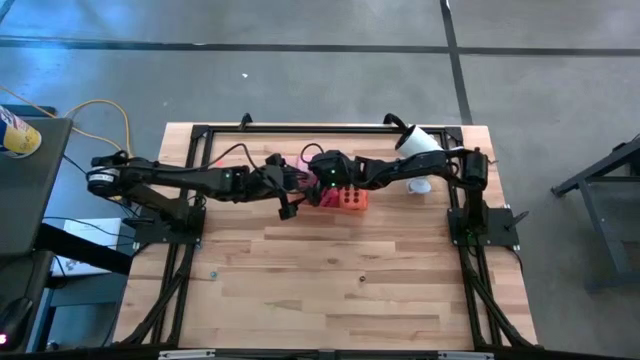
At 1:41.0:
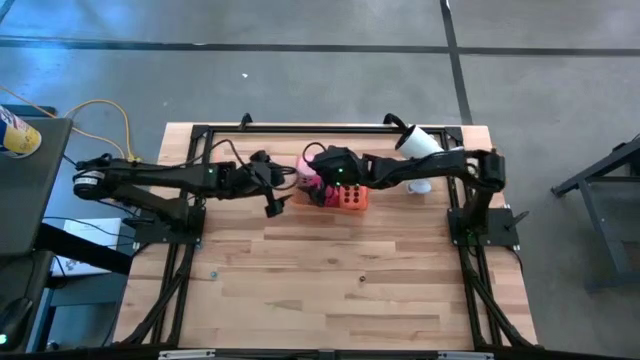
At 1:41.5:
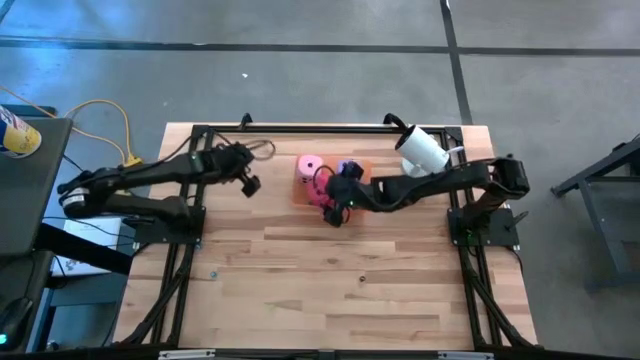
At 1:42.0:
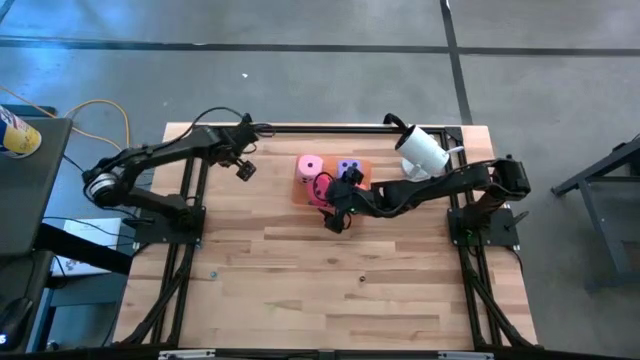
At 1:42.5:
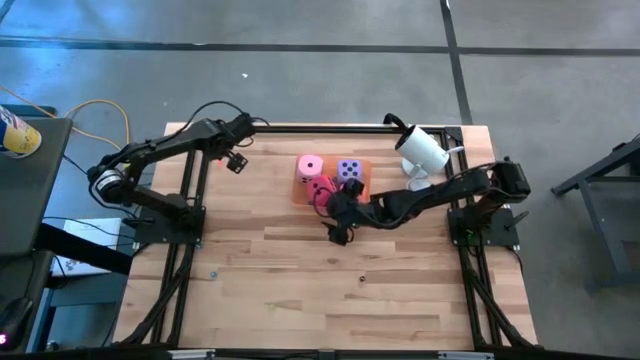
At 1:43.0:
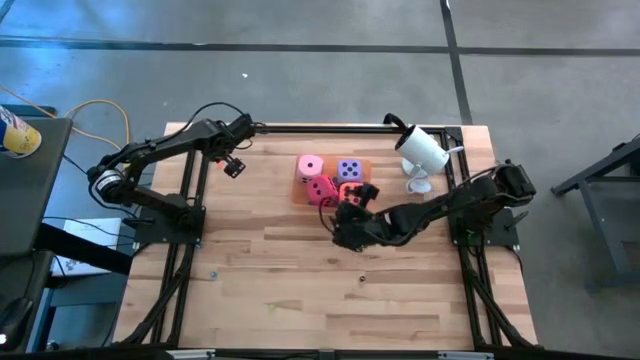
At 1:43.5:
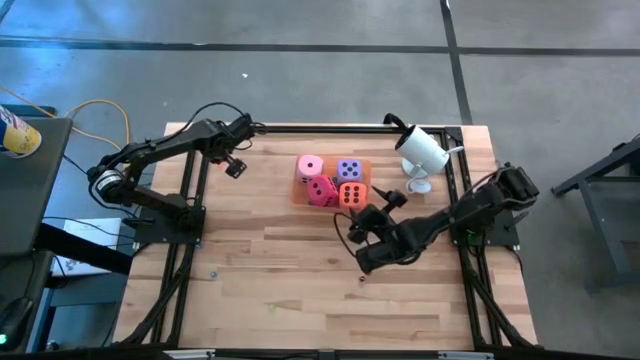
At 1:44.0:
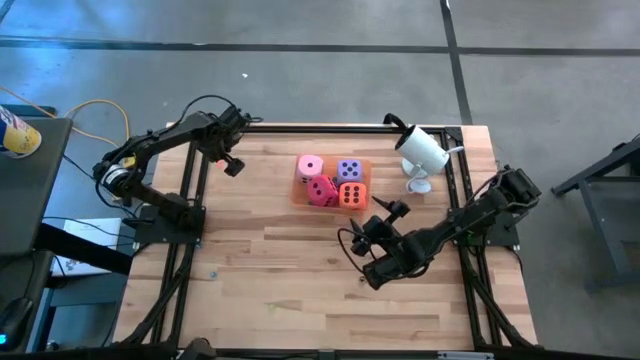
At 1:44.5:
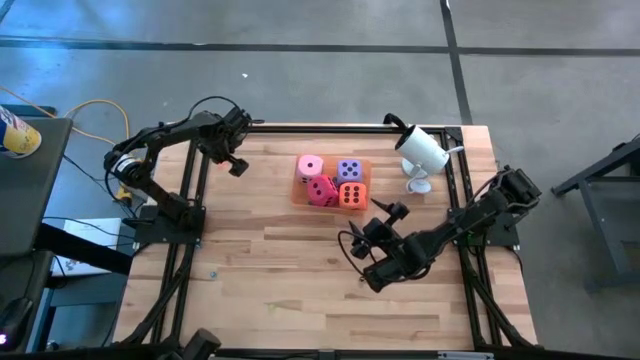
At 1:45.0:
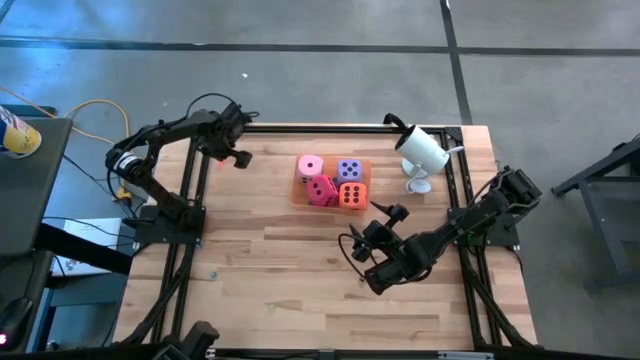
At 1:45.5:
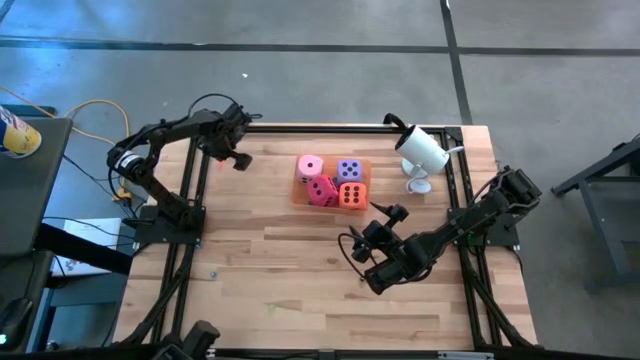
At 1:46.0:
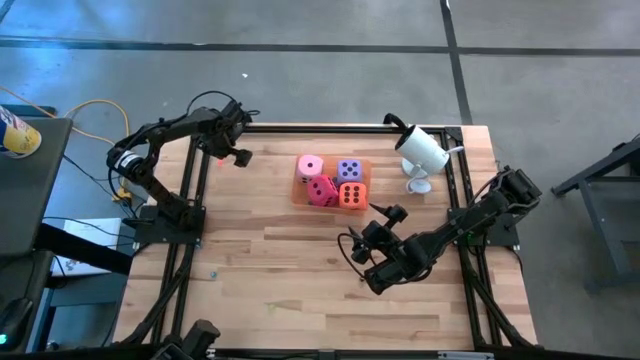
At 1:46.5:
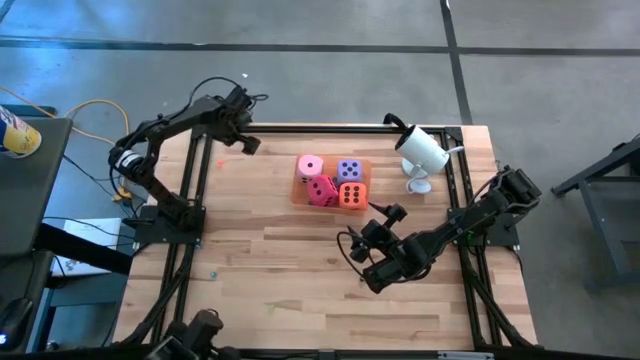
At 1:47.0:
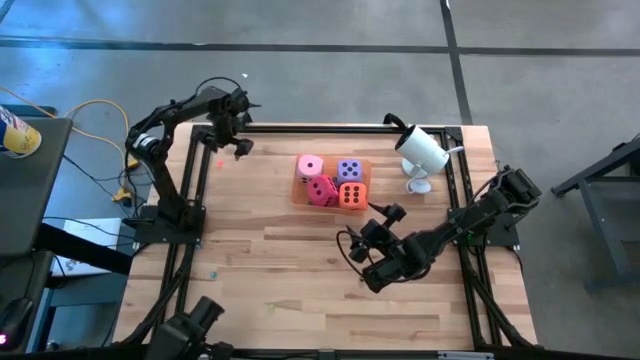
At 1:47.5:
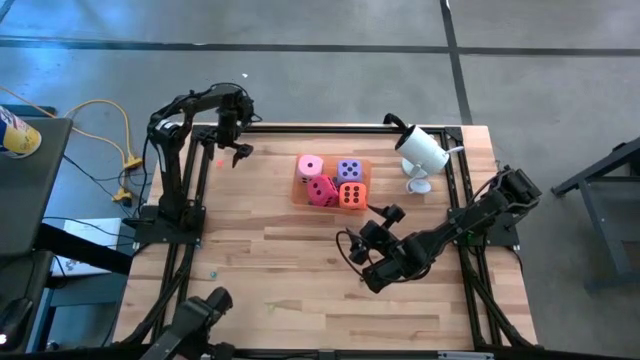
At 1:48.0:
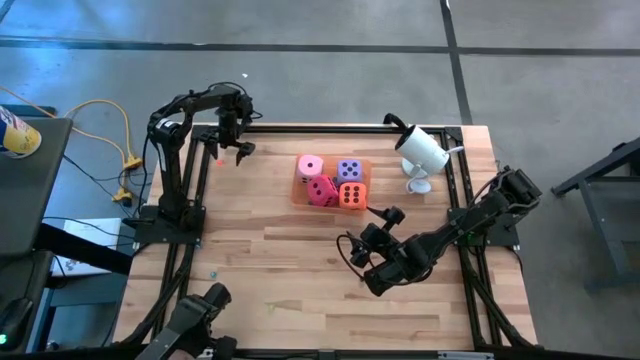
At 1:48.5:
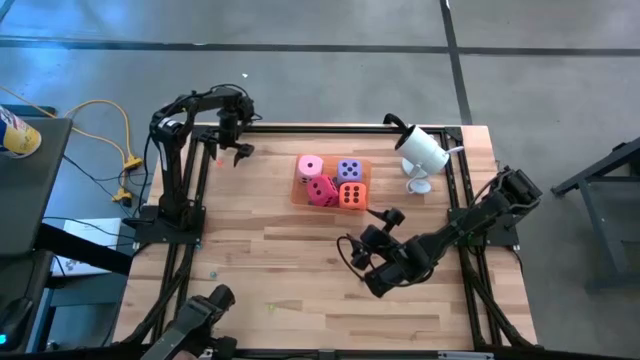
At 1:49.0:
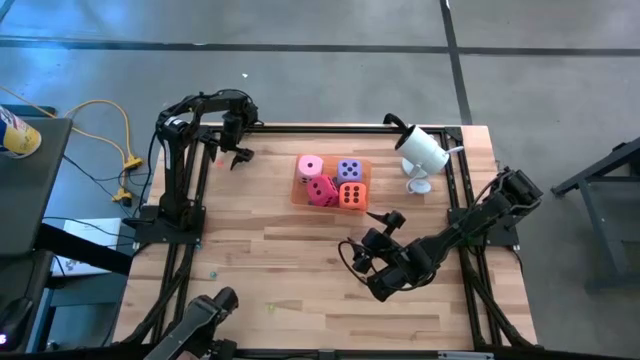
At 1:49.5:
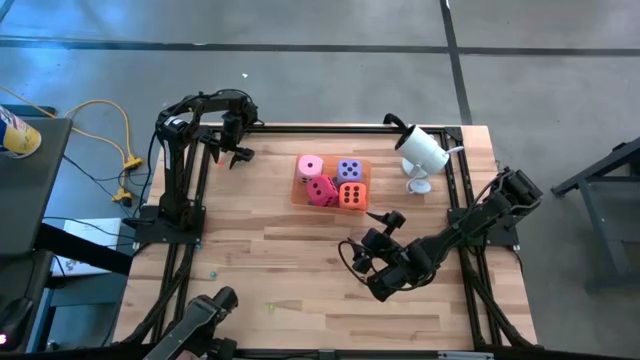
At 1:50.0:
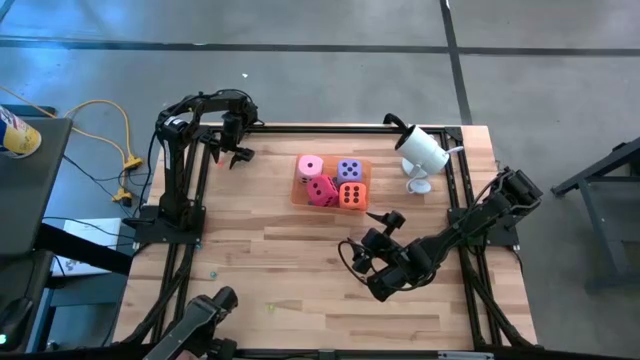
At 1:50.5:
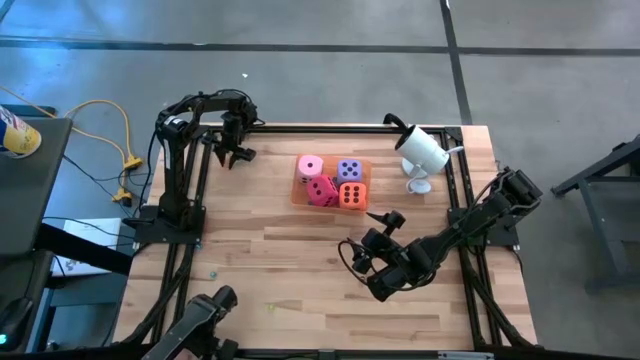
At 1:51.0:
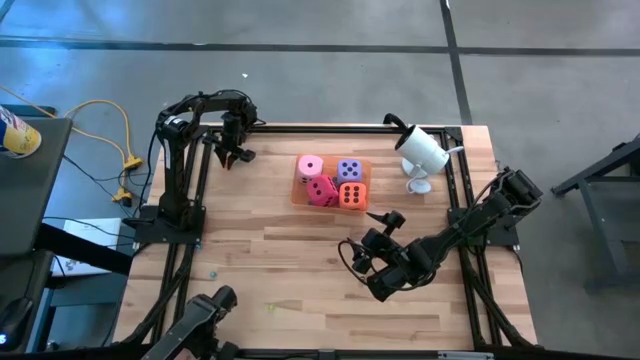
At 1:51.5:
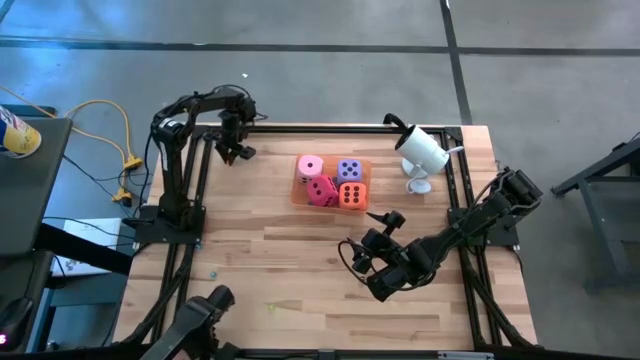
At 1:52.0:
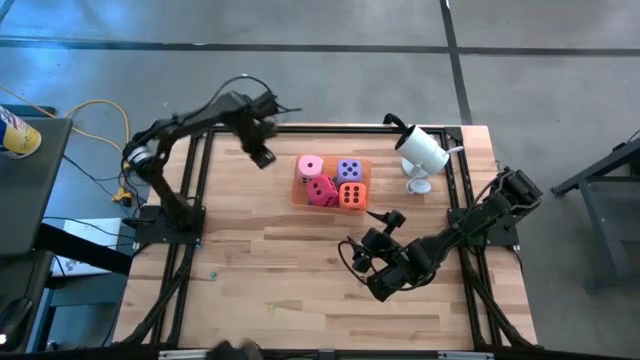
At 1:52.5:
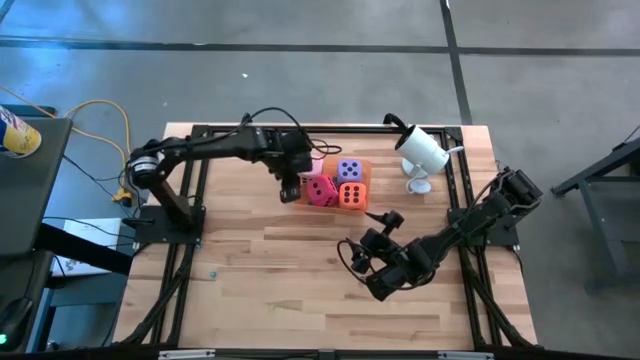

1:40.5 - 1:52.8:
Task: Pick & Place Dice
Put the small orange die into the orange bin

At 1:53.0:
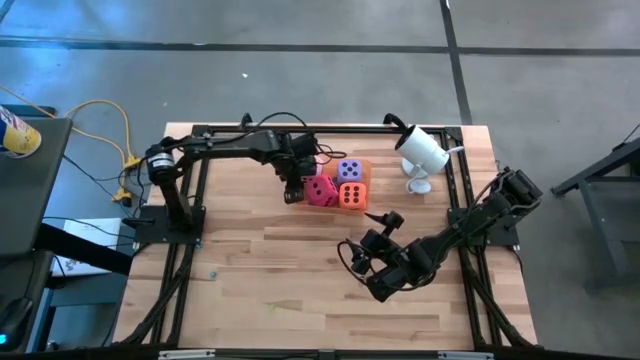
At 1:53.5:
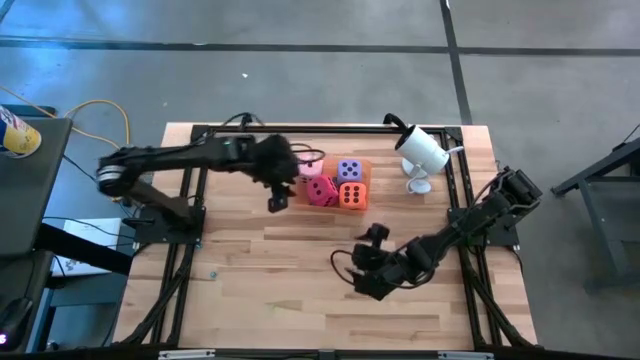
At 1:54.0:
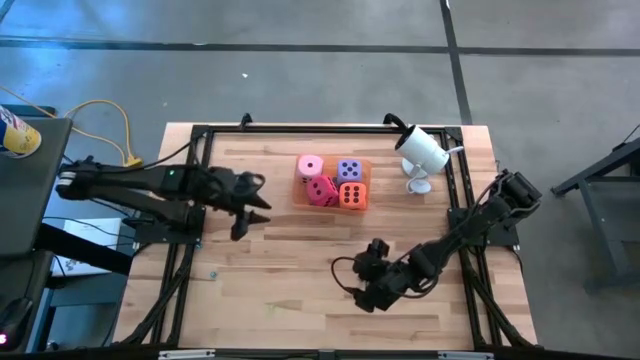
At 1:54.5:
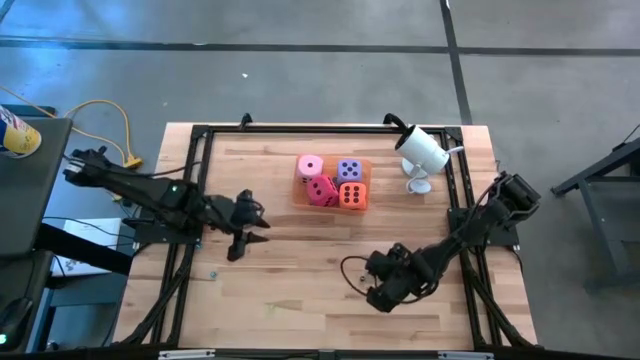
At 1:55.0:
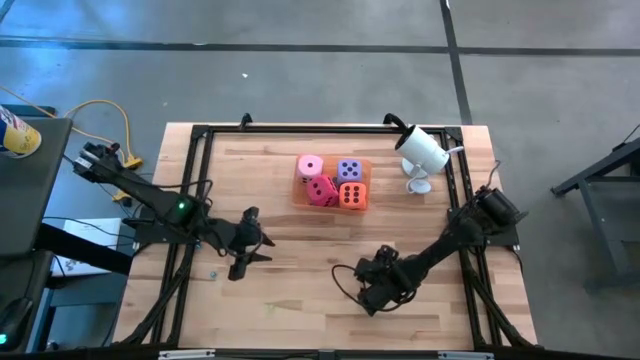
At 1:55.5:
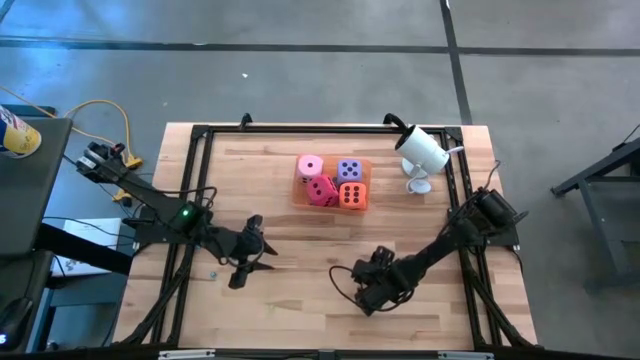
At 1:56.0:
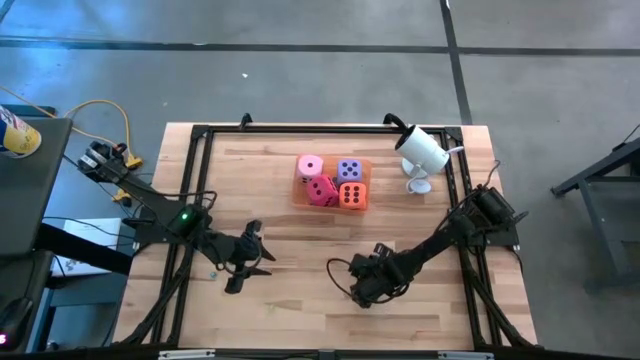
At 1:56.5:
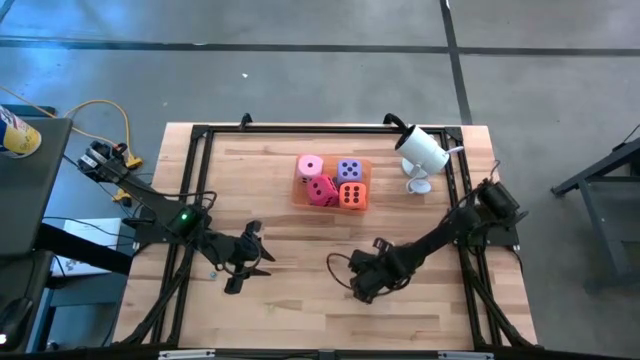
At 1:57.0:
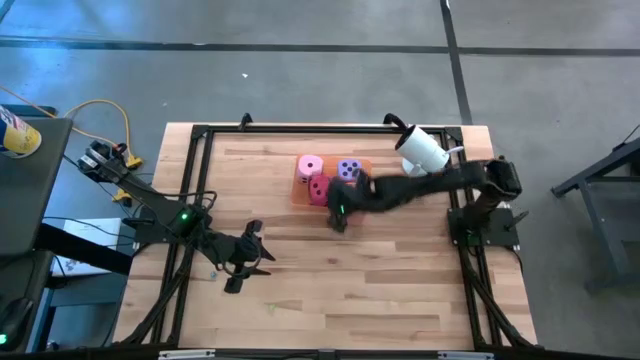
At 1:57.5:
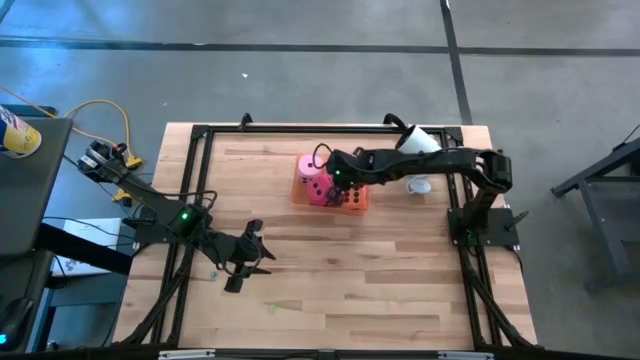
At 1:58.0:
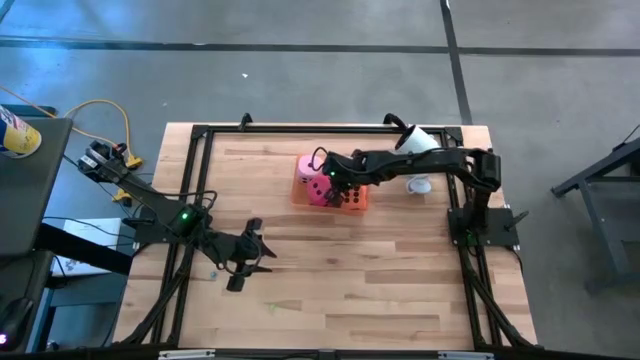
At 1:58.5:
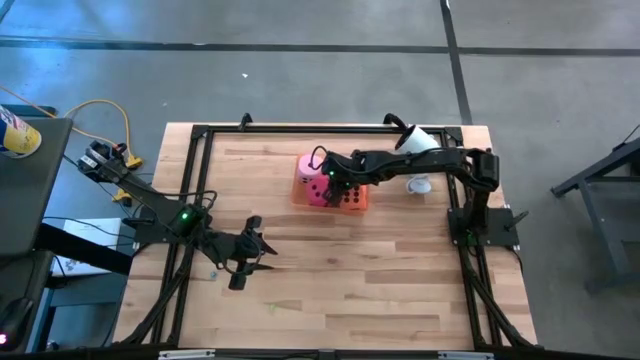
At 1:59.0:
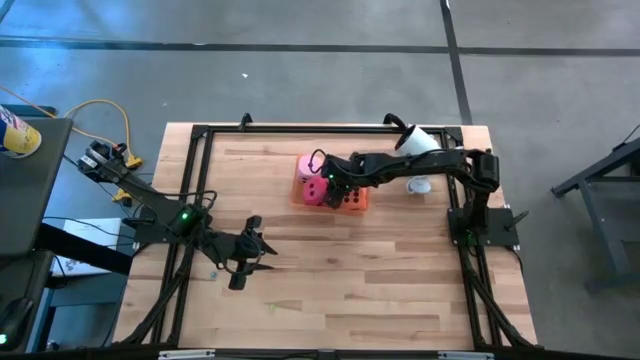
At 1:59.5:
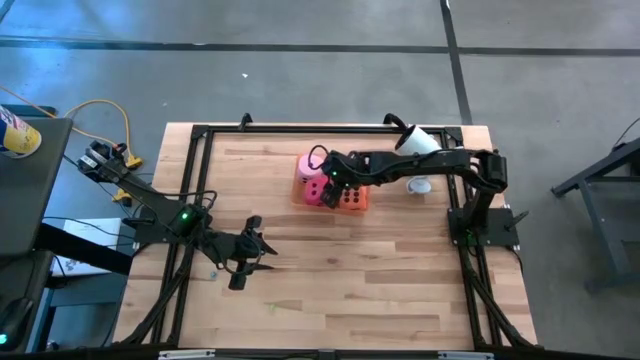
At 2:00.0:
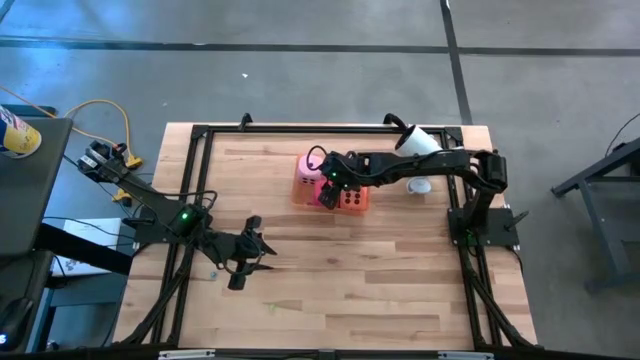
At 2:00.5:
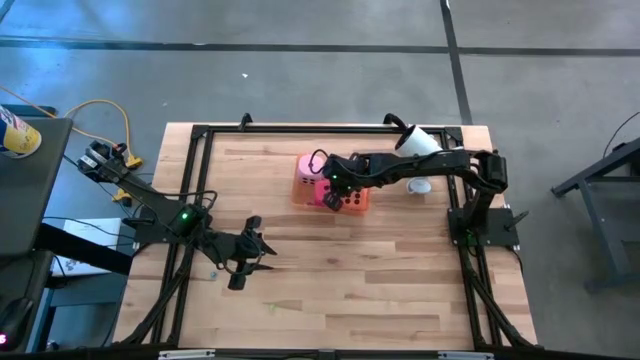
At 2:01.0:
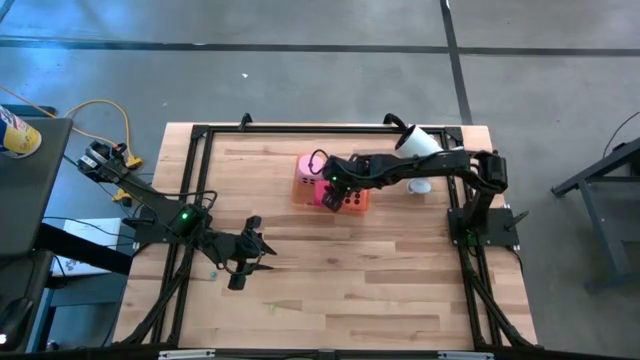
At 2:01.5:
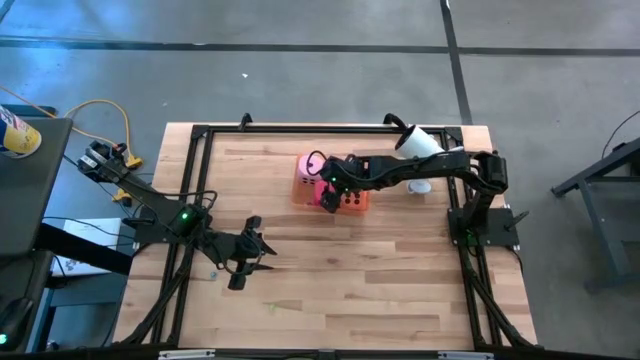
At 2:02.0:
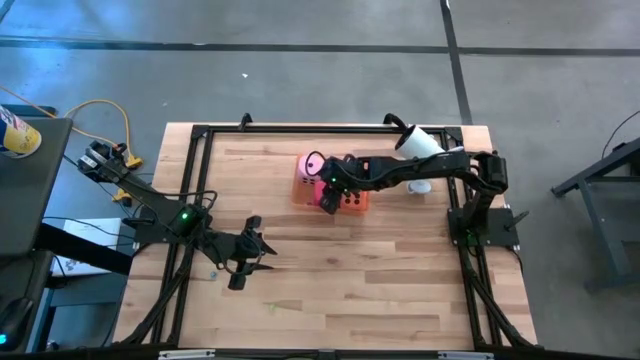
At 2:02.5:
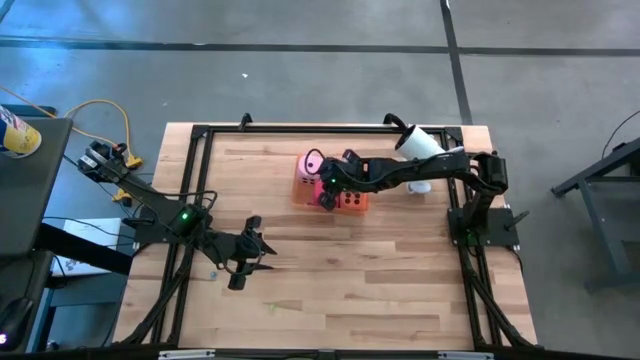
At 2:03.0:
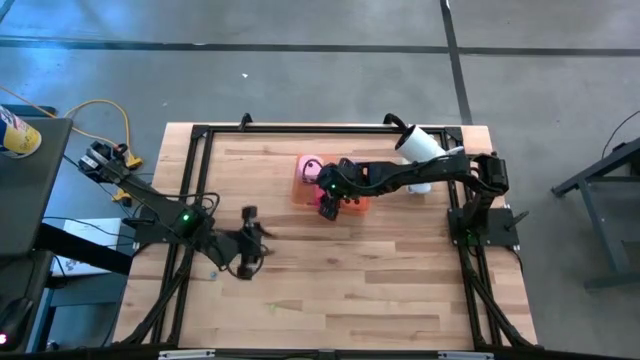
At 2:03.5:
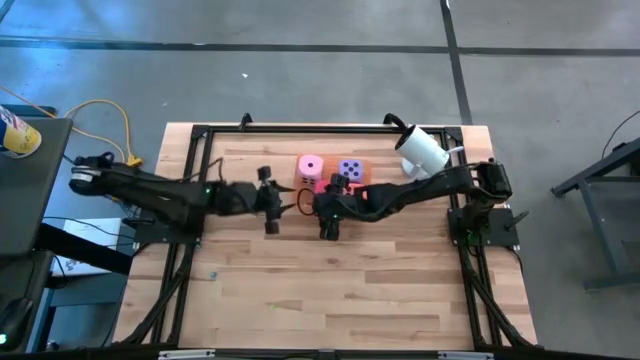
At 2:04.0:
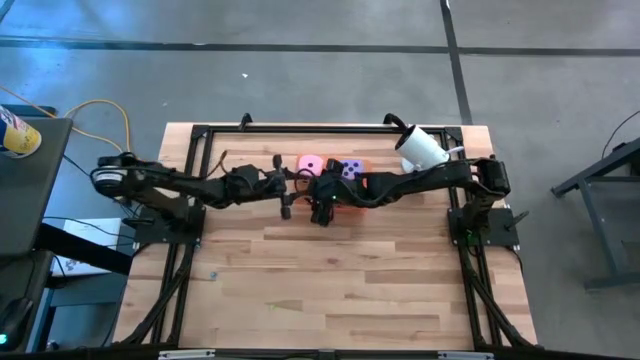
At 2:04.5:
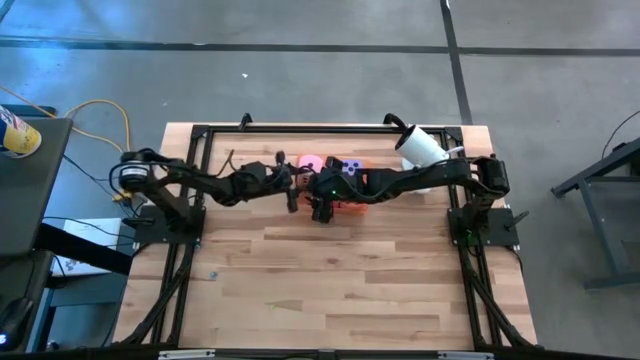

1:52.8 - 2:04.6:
Put the small black die into the orange bin
